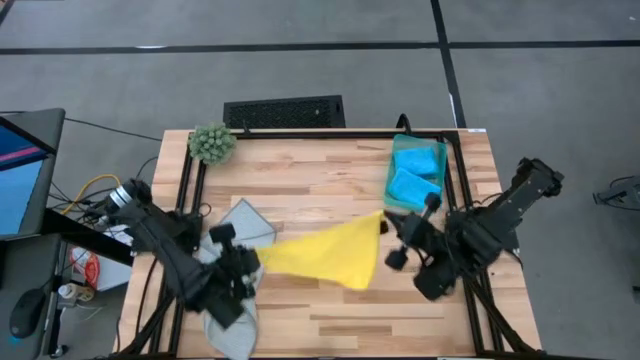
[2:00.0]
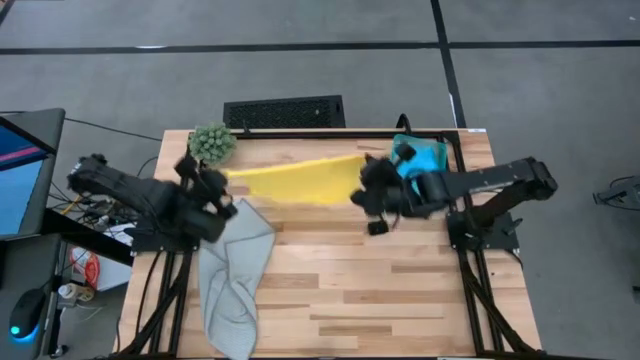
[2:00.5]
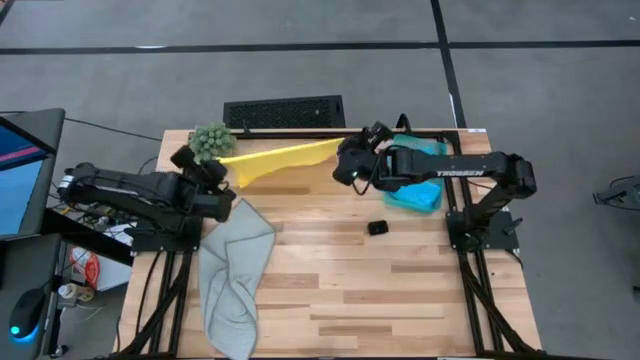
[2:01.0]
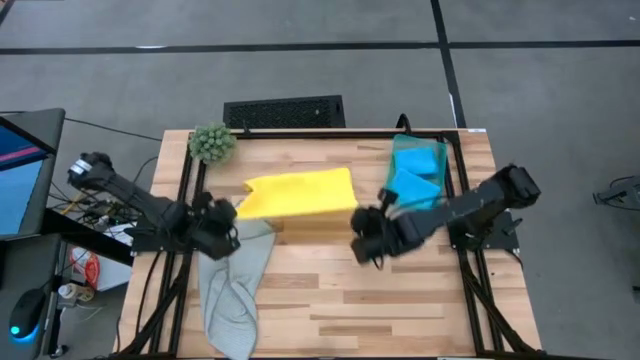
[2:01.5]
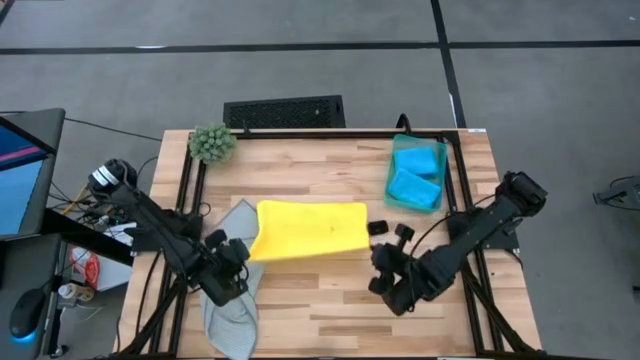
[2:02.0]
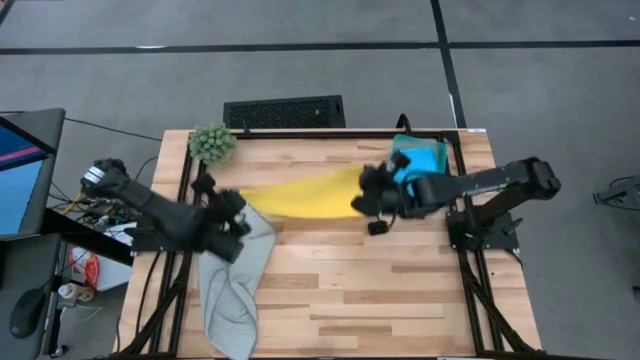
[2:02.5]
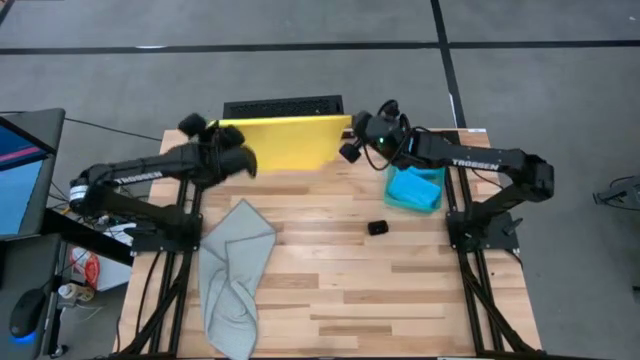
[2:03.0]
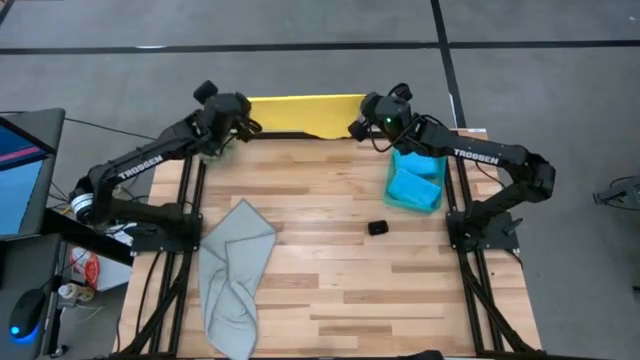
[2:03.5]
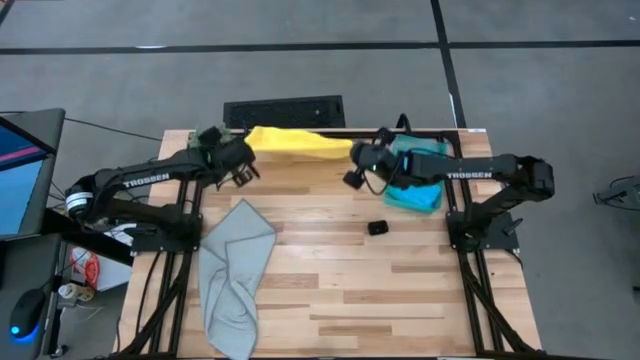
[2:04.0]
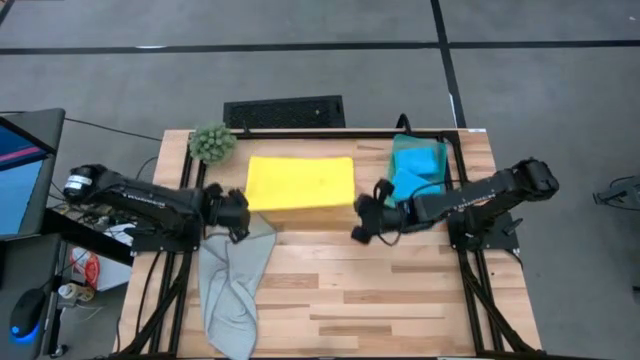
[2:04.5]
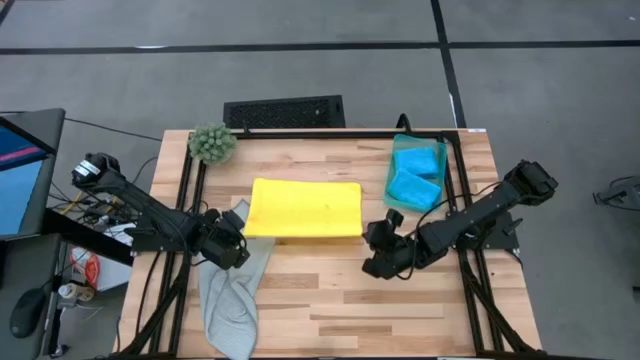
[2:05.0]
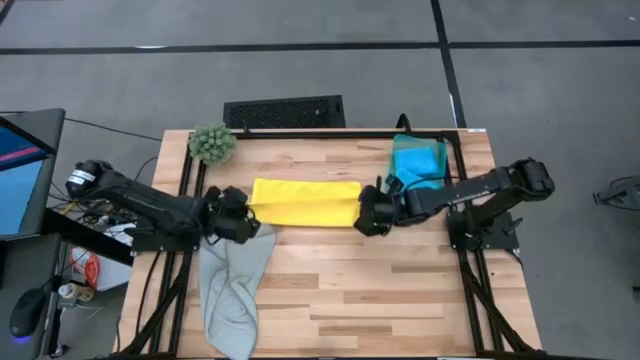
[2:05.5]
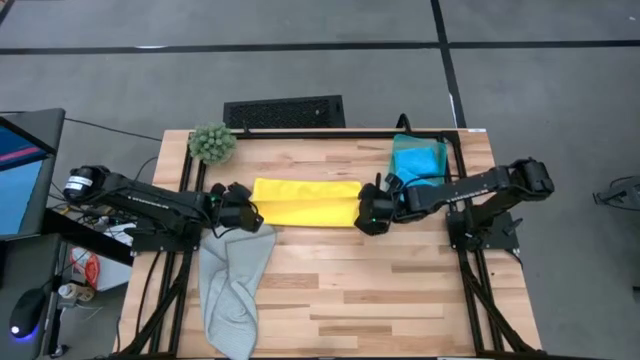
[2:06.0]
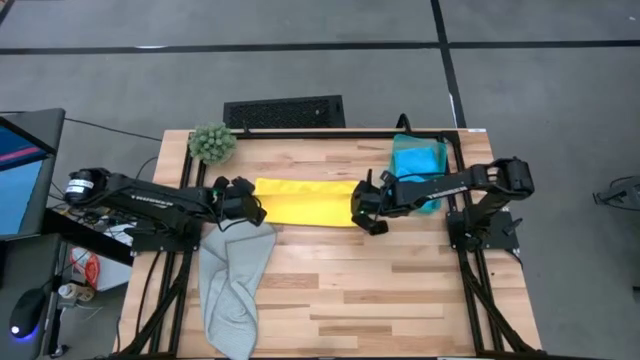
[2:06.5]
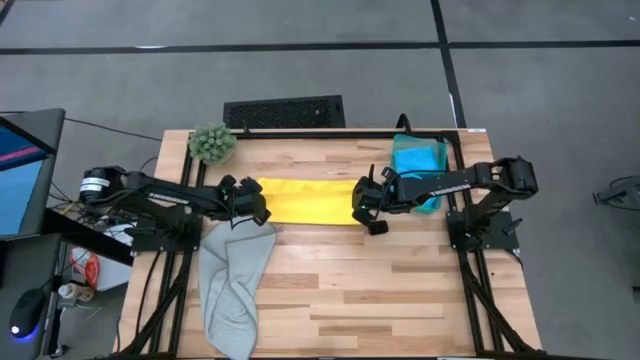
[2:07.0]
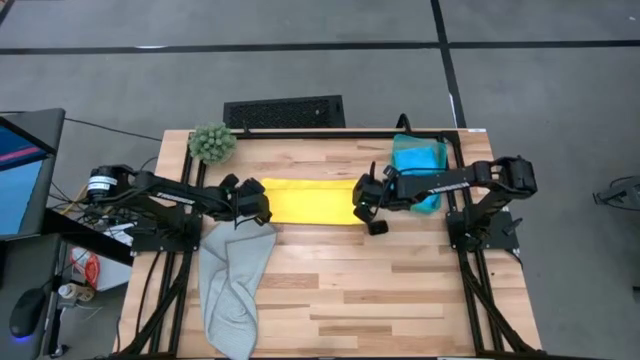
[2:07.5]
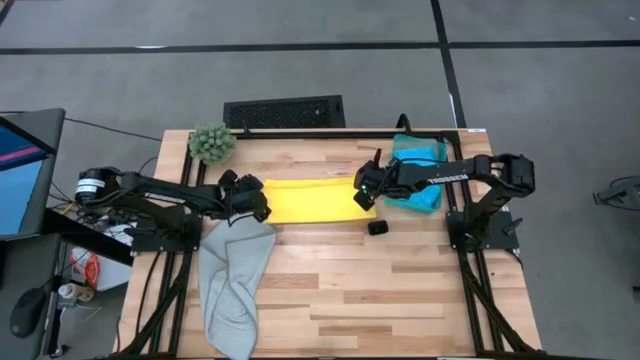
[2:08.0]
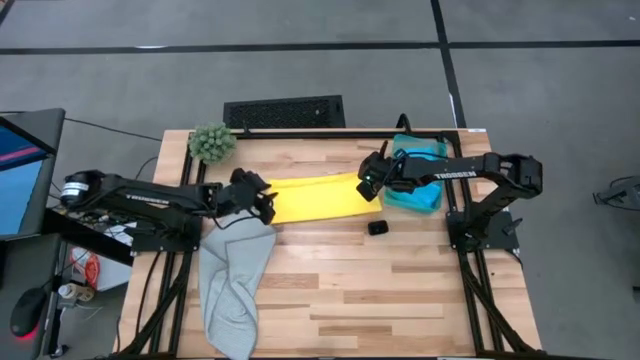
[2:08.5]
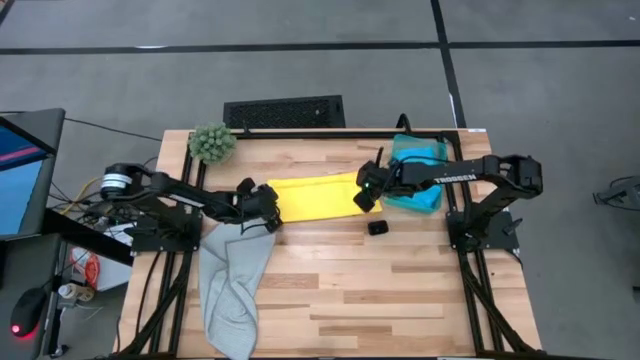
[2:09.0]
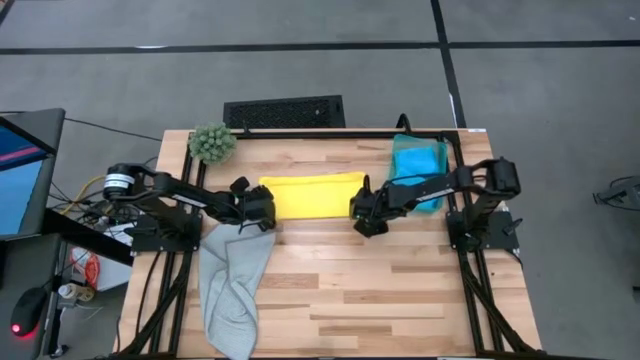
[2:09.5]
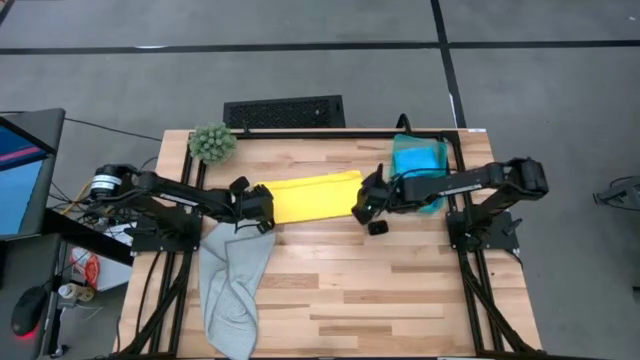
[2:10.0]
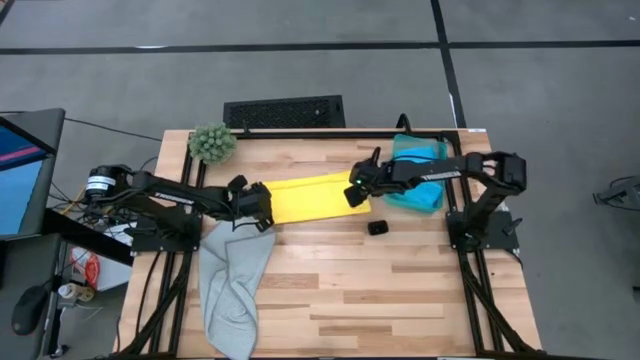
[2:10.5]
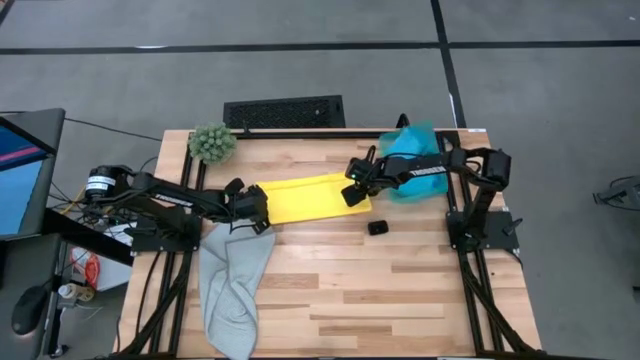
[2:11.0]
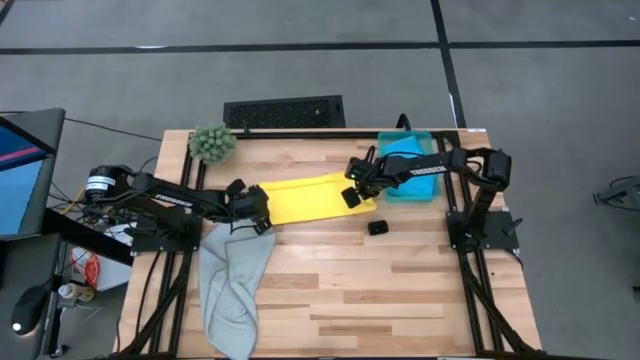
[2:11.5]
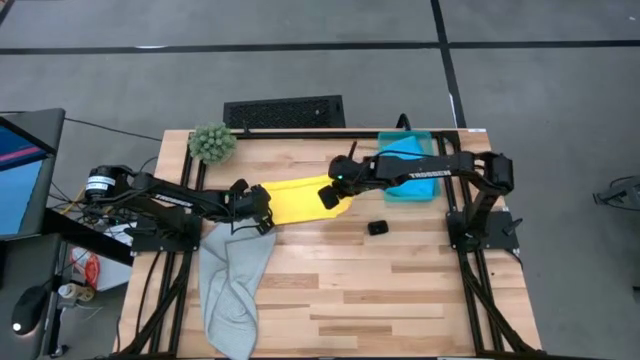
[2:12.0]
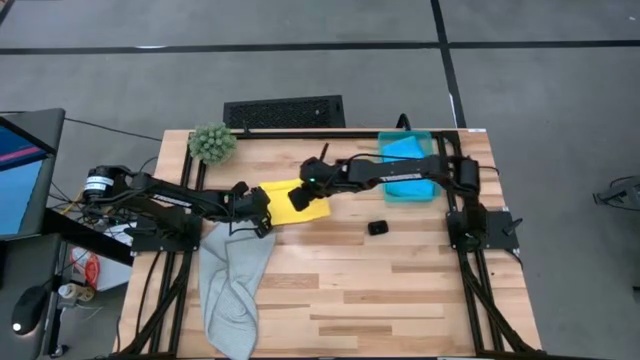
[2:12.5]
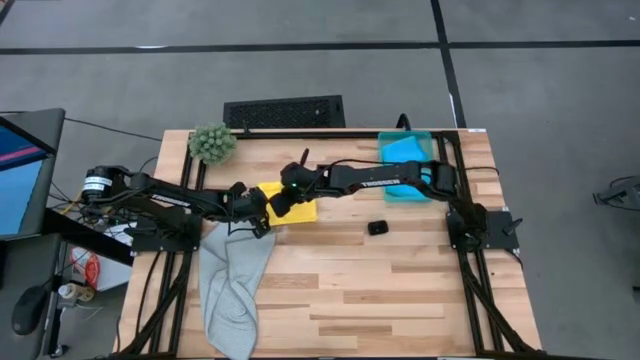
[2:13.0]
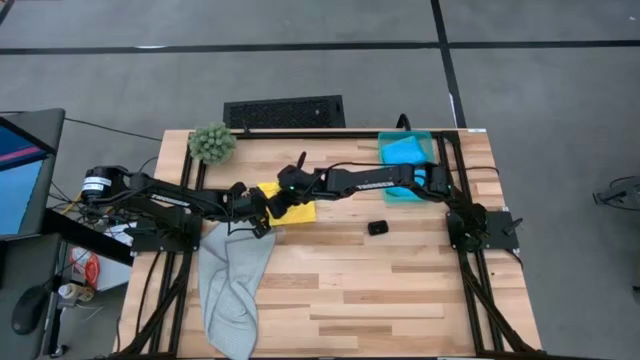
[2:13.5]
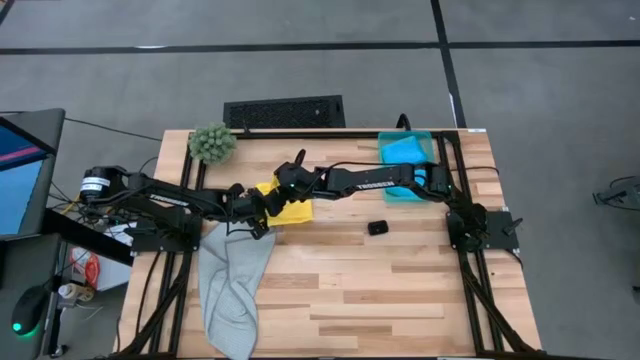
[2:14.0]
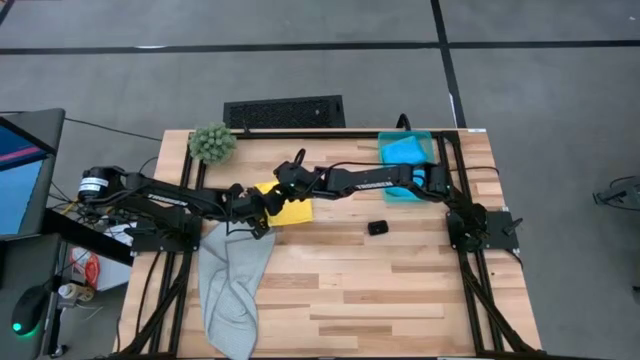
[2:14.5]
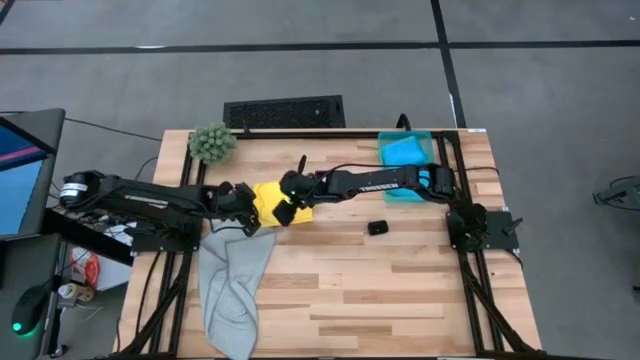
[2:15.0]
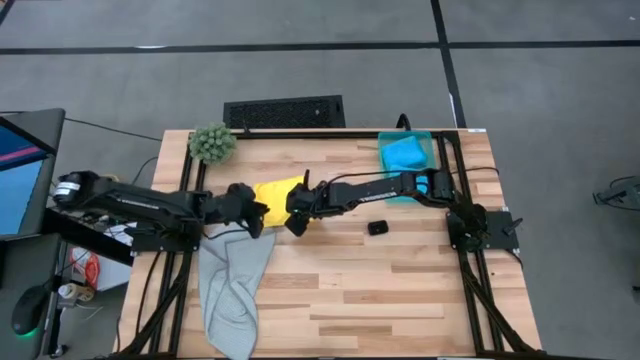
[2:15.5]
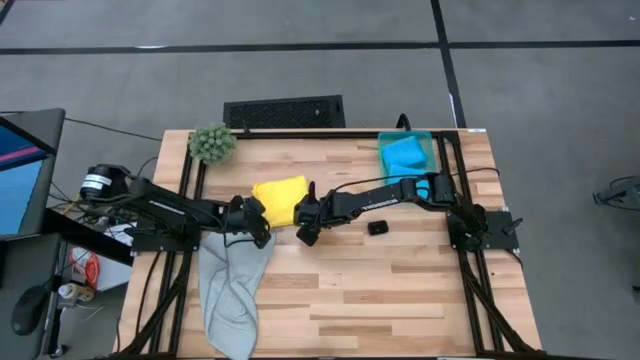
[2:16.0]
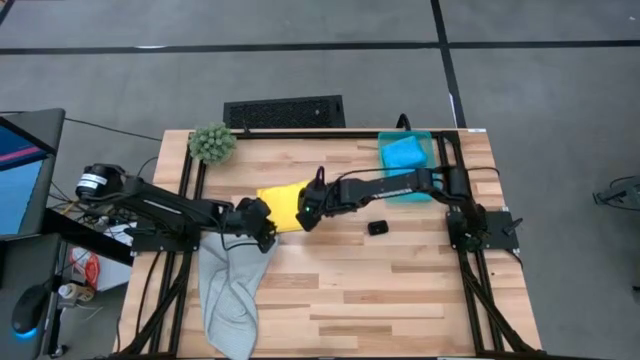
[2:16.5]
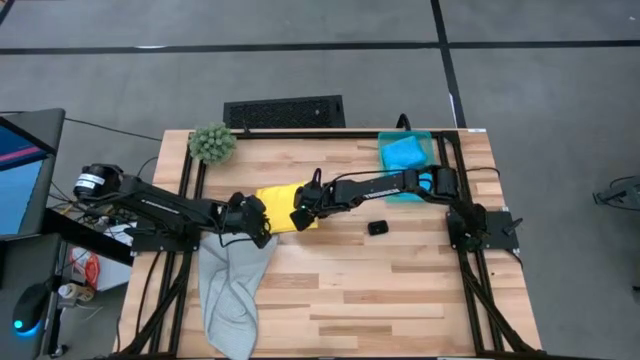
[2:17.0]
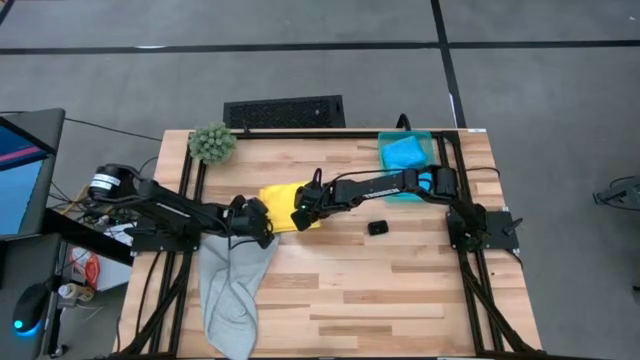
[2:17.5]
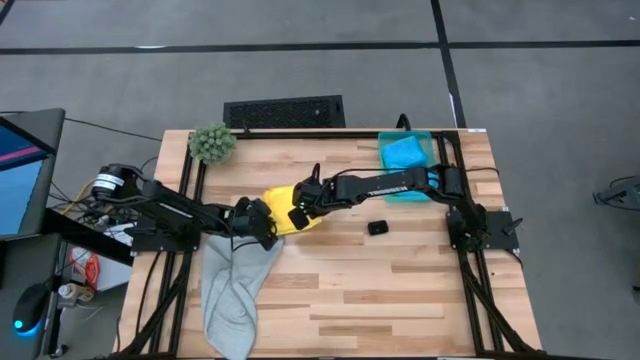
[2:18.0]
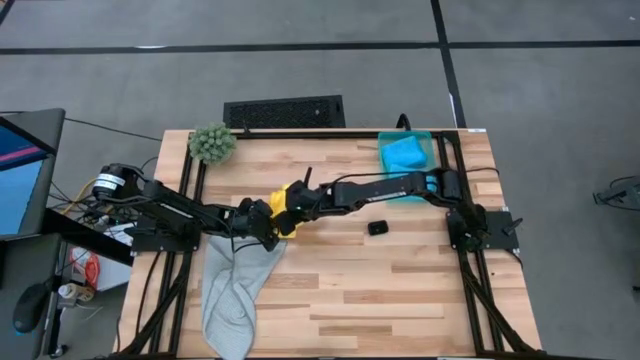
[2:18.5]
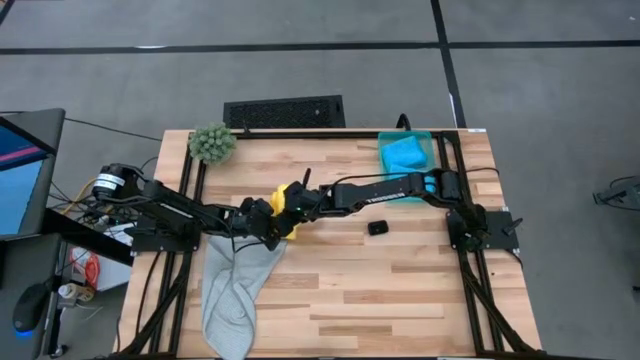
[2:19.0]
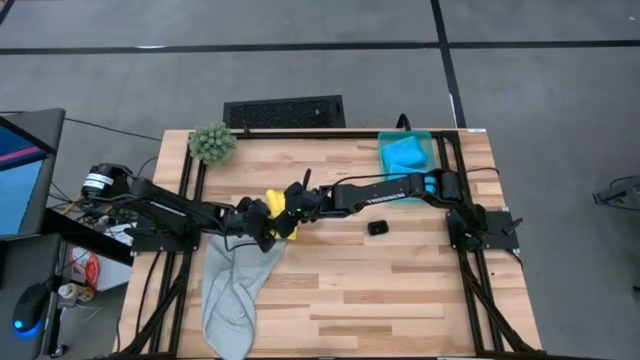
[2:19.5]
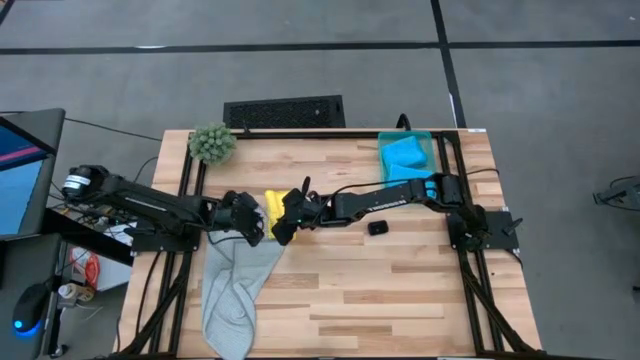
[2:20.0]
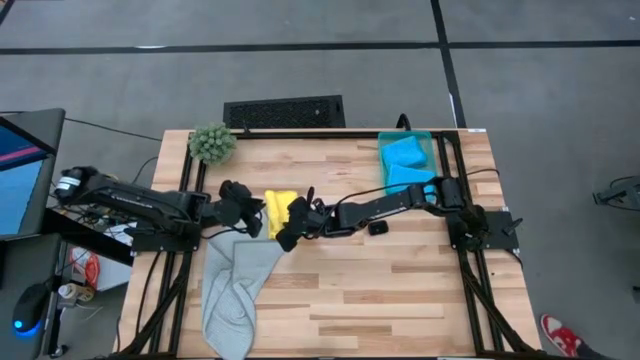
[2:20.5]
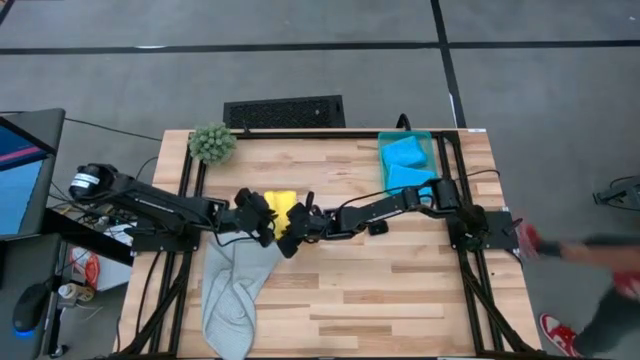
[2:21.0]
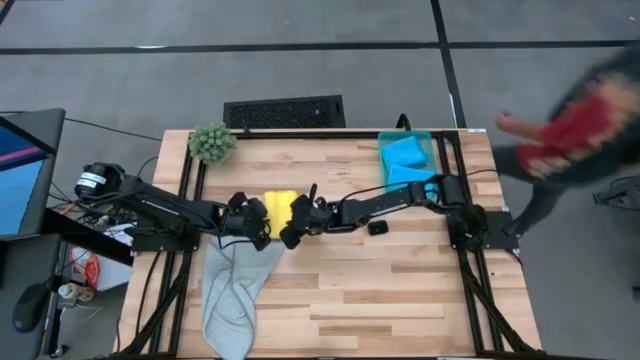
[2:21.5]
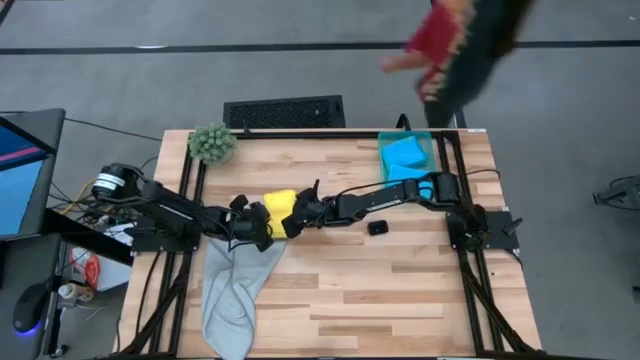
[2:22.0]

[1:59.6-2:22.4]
Task: Fold microfiber towels
Fold the yellow microfiber cloth
